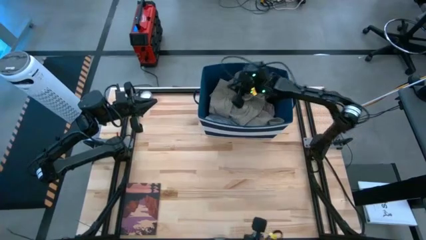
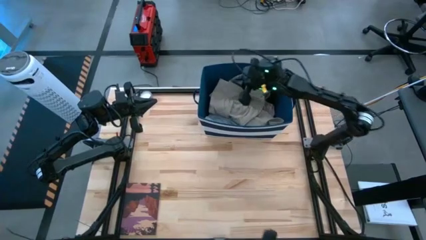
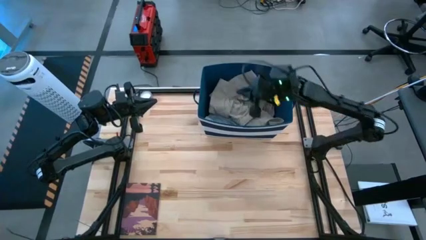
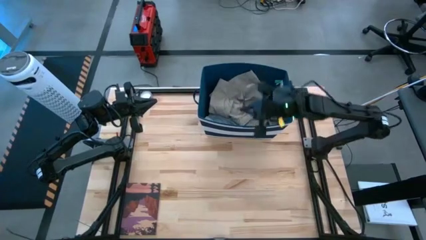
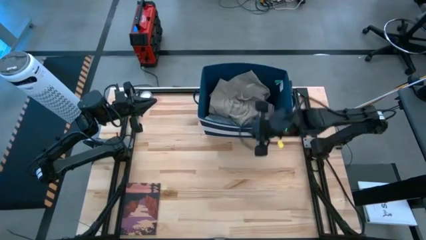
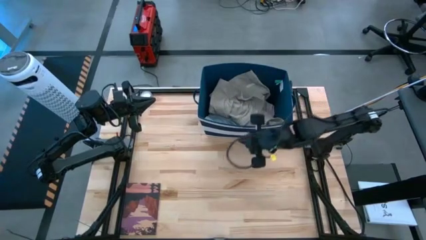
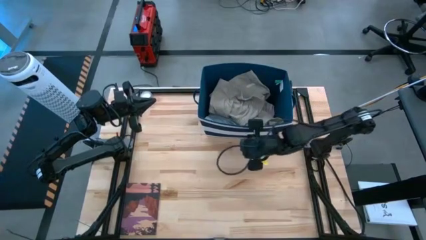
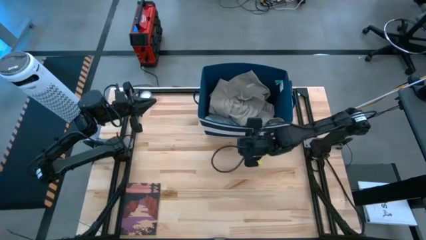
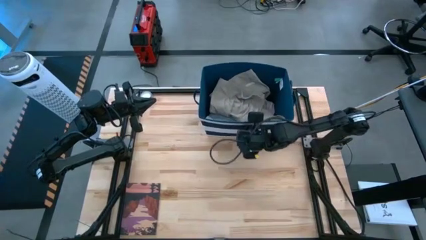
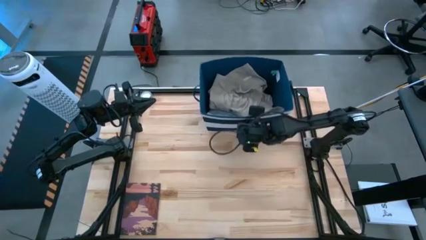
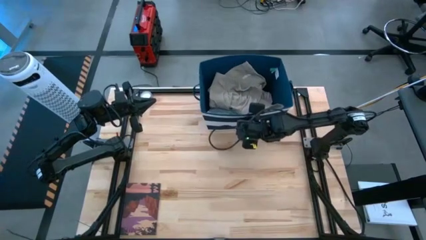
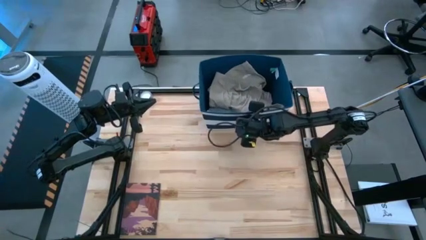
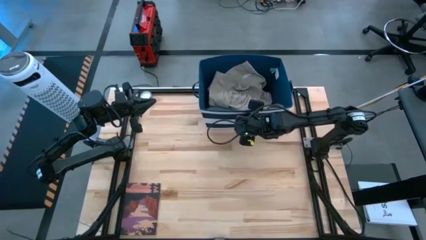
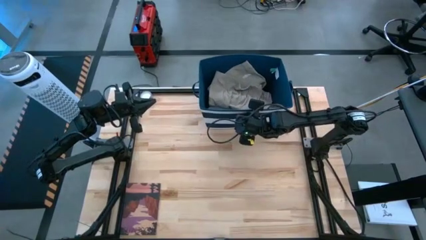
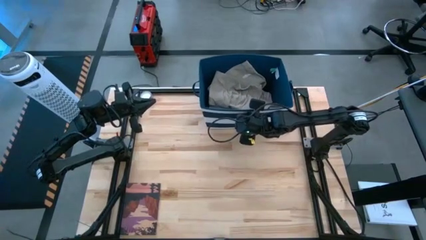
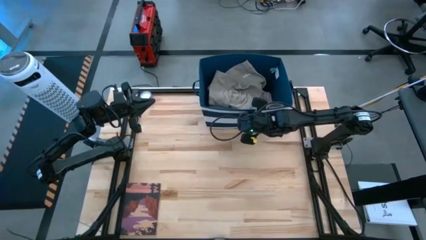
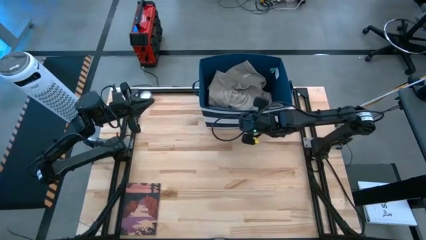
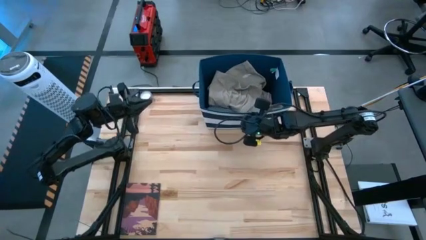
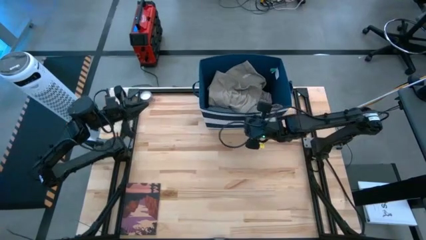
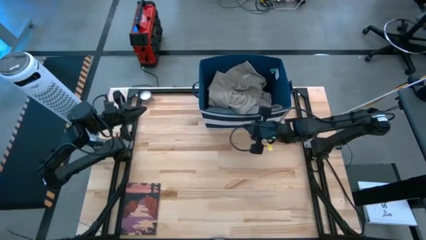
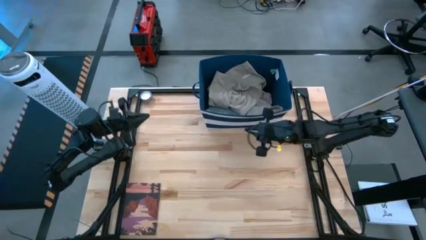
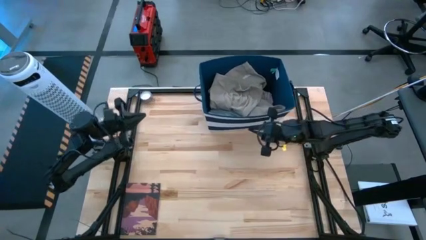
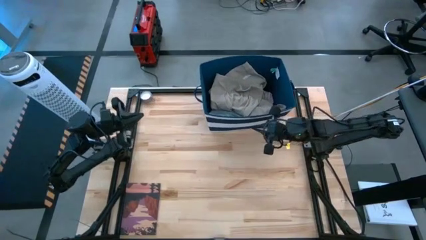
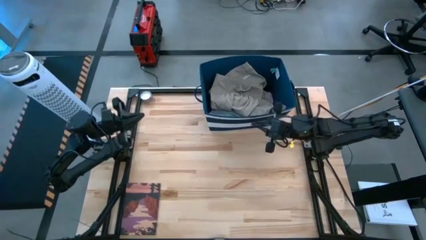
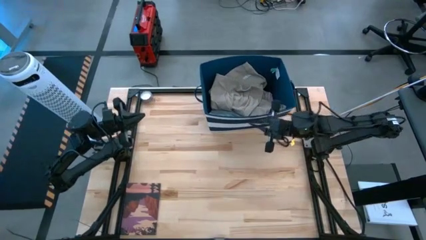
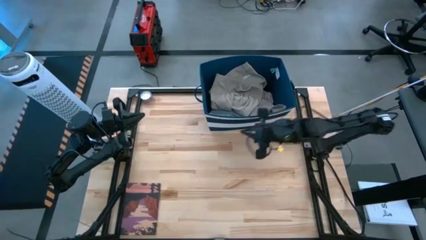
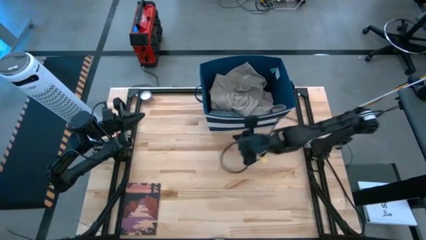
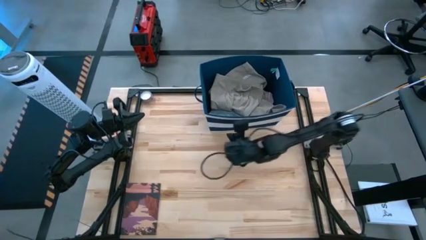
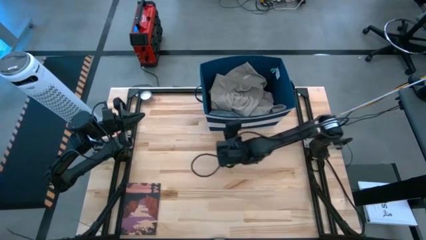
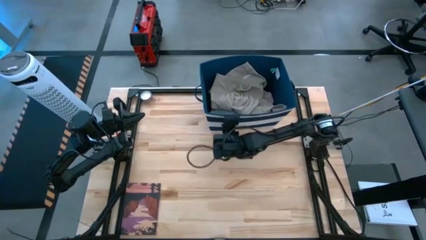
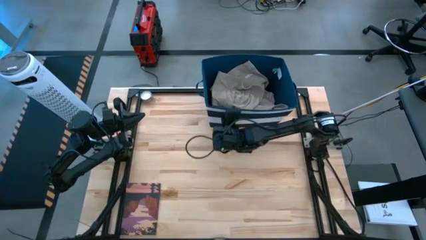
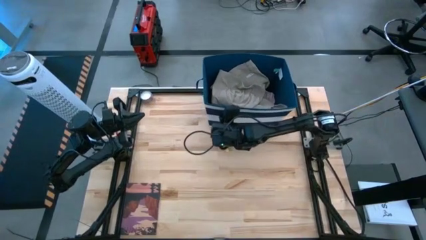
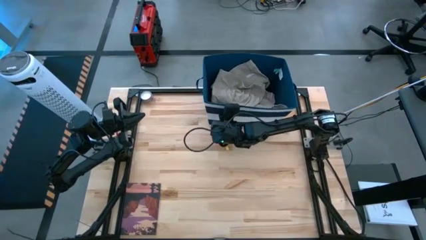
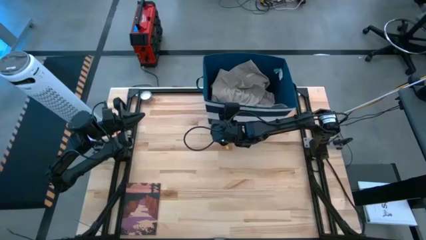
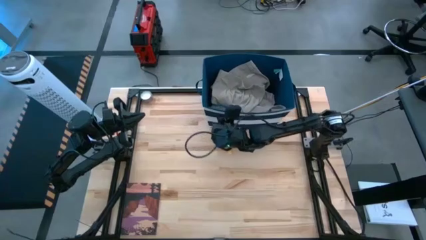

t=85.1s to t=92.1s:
Task: Sort clothes
Adjust the laundry bin

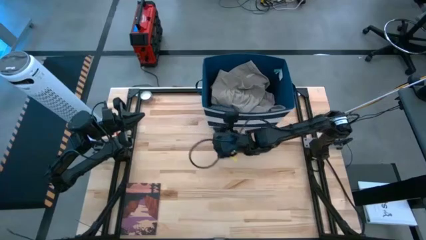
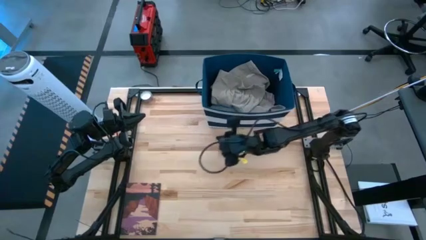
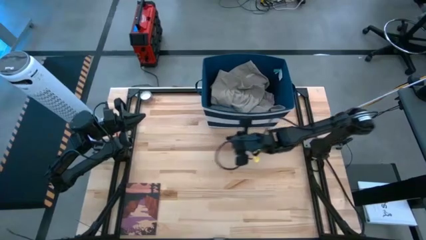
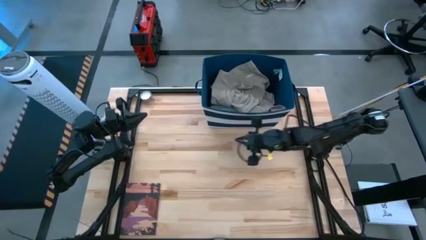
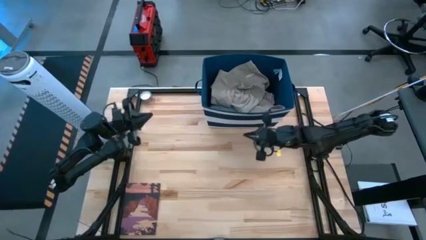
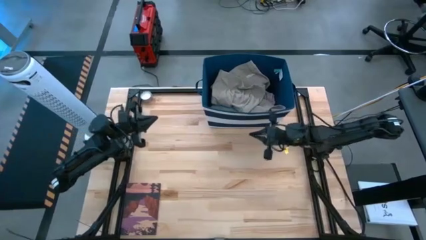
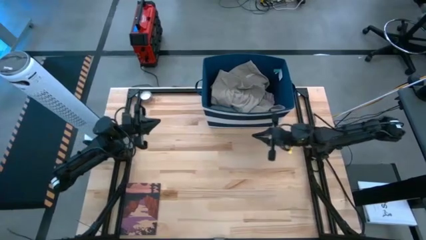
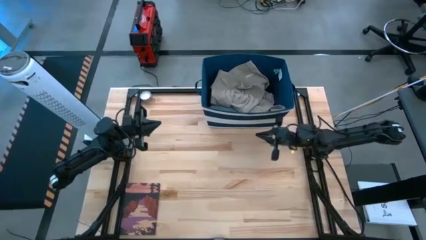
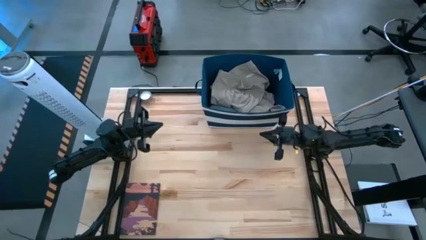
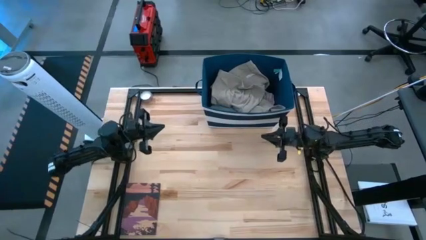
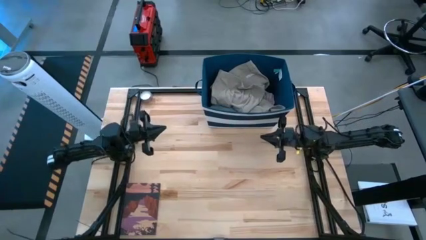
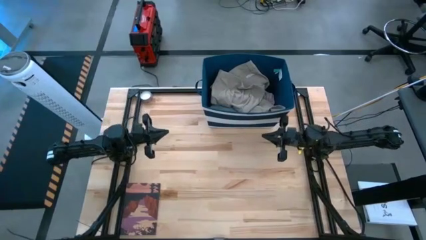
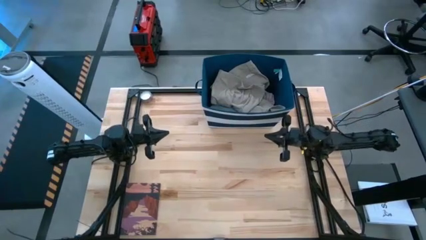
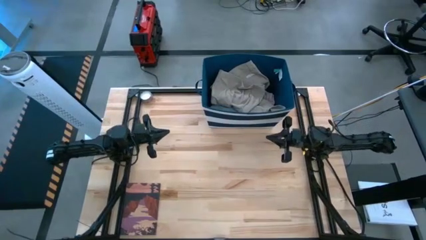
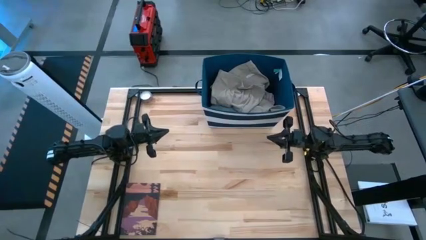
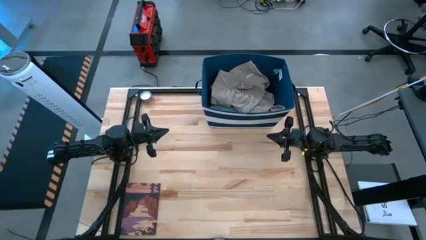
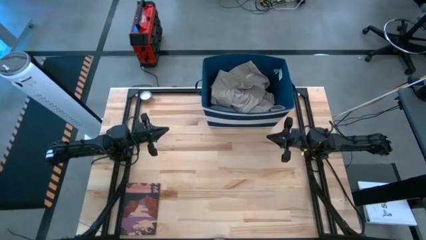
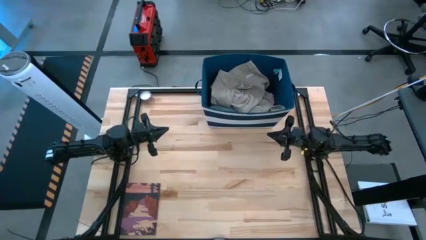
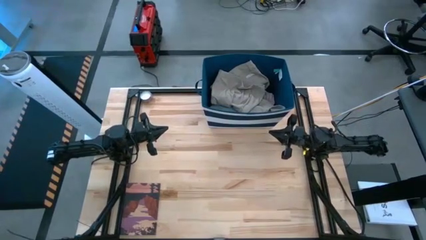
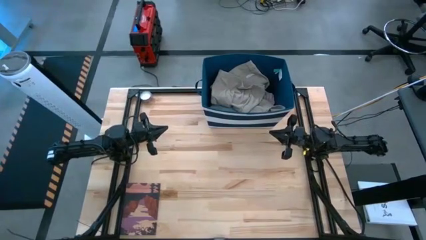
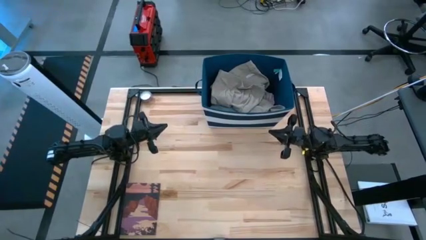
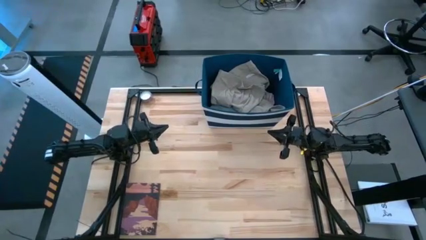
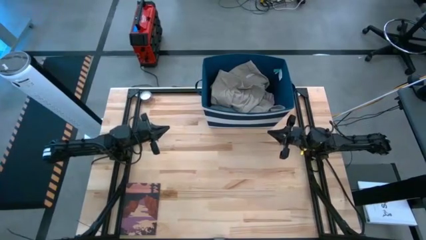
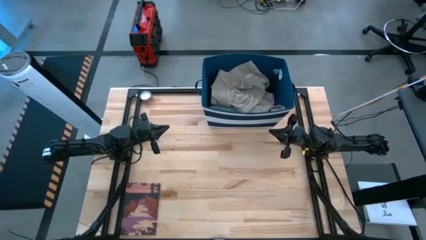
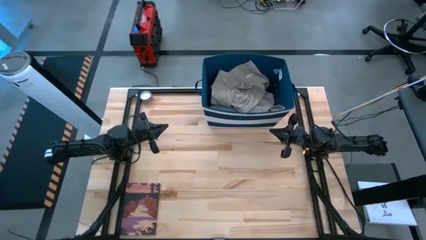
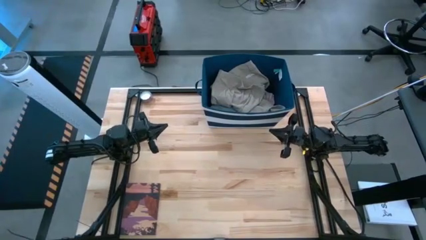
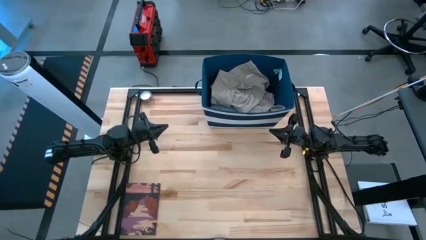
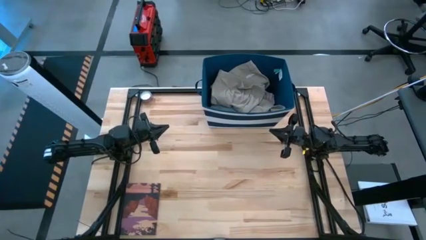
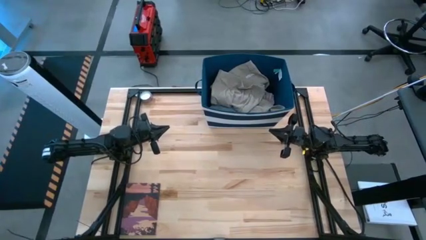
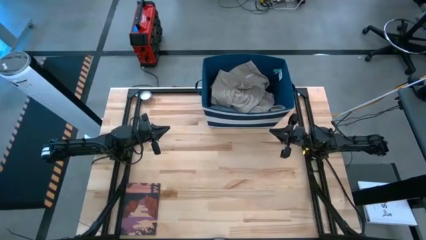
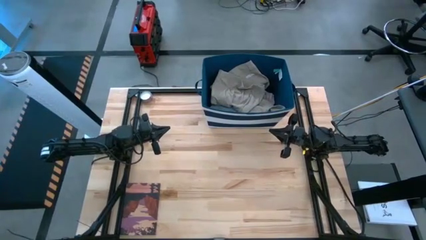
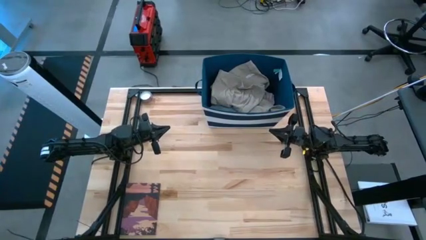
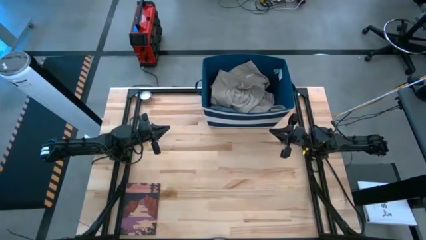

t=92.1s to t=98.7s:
Return to Home Position

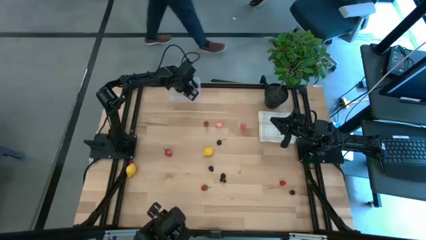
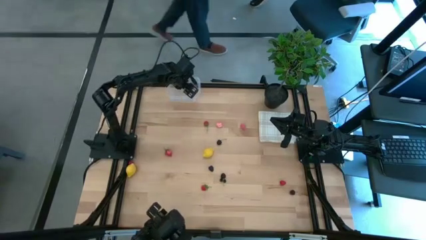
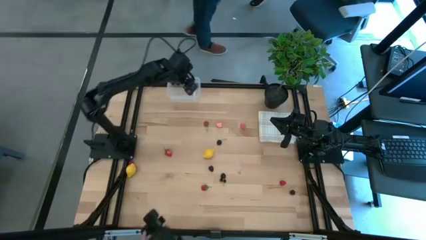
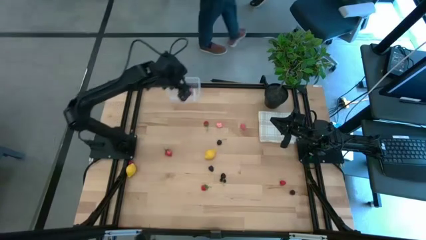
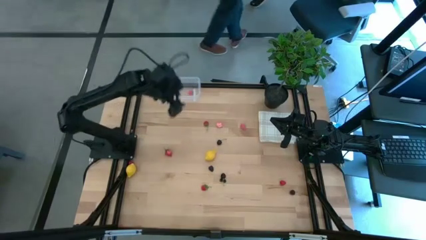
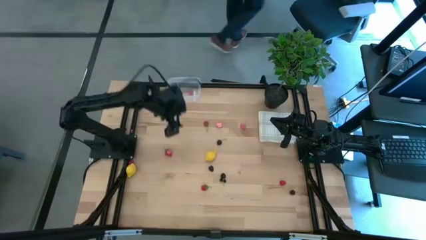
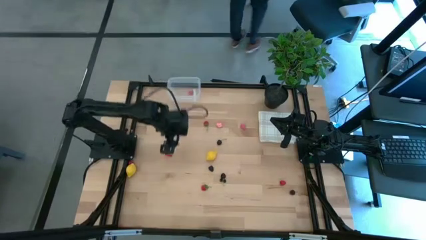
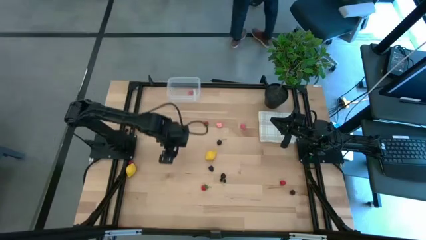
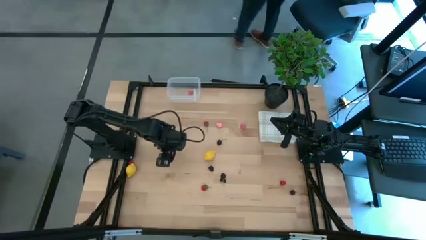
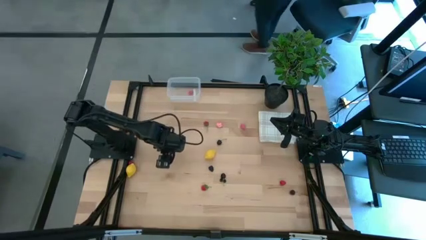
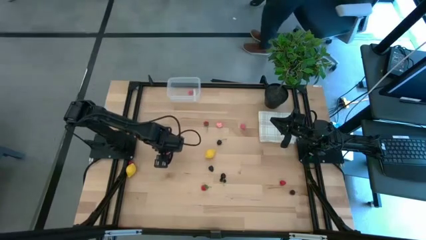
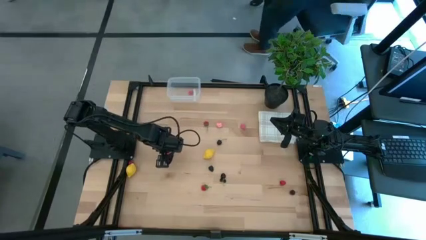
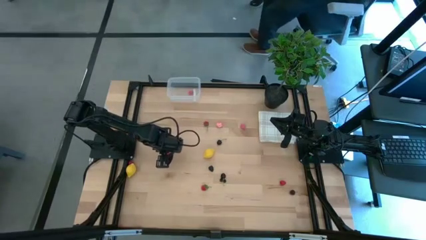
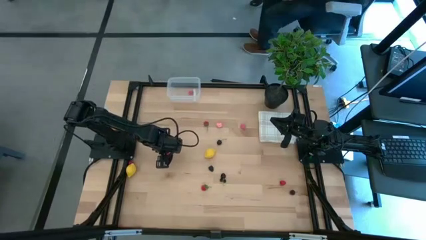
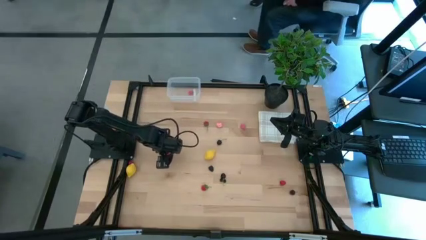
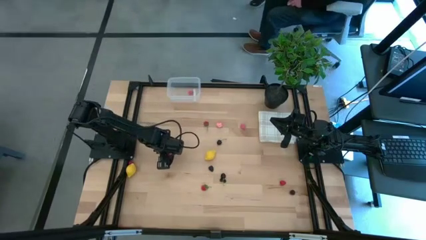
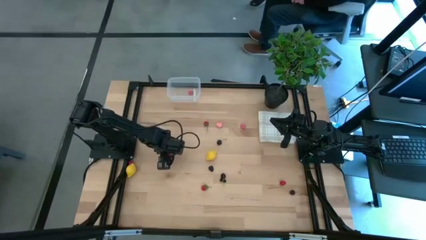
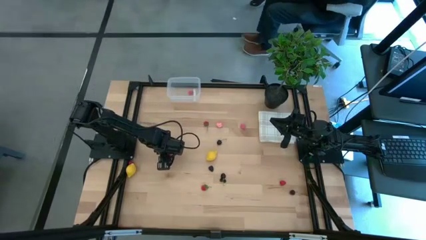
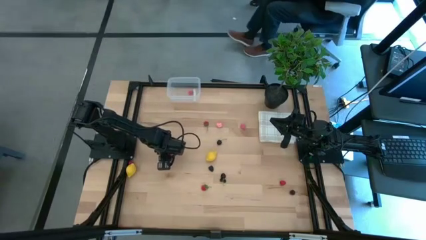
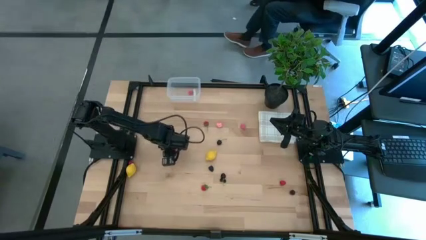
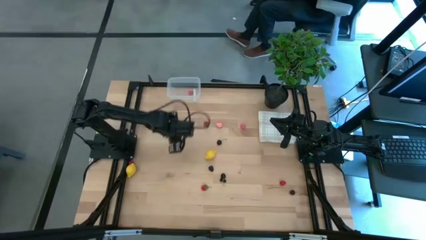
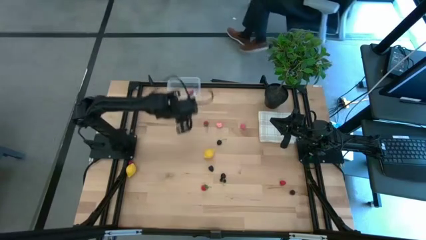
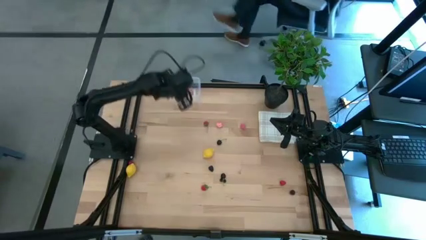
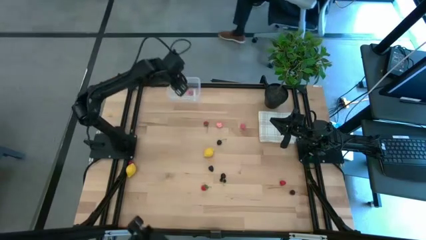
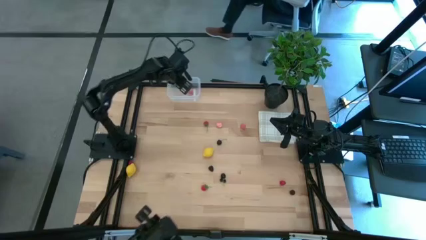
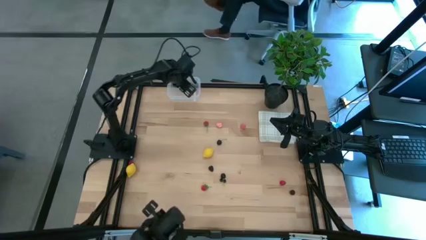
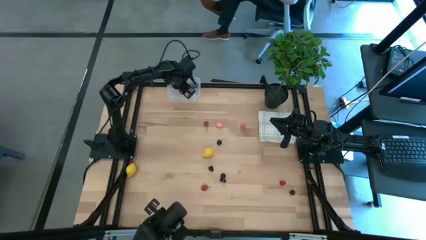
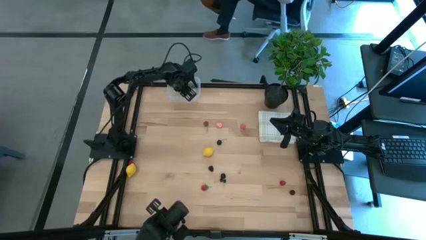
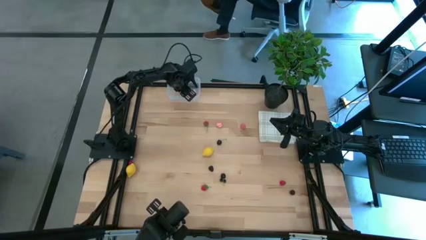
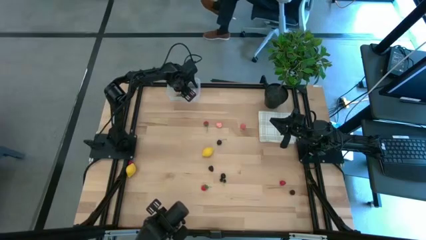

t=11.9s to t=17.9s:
Task: Pick and placing Produce into tupperware
Put the middle left red strawberry into the transparent bin
